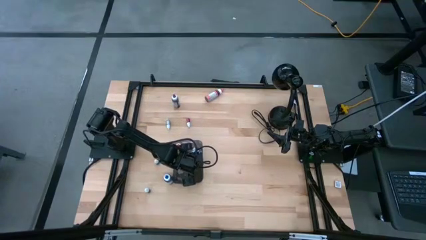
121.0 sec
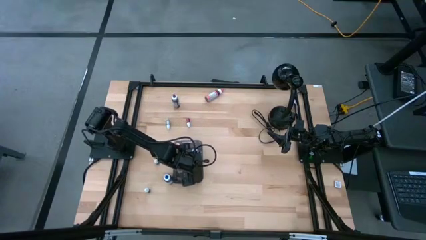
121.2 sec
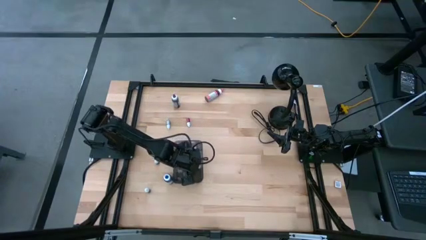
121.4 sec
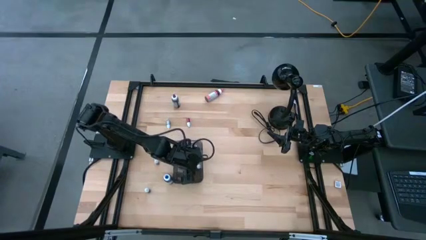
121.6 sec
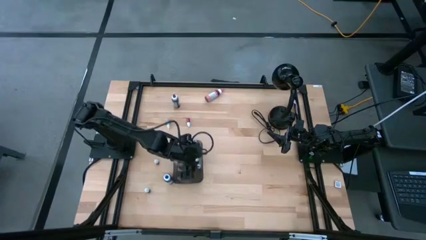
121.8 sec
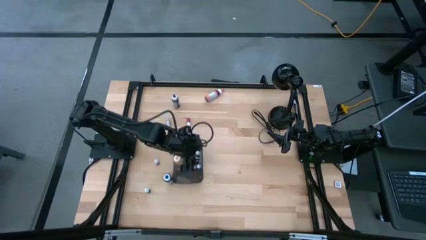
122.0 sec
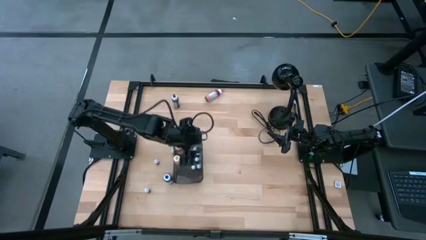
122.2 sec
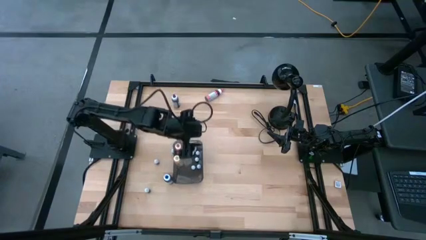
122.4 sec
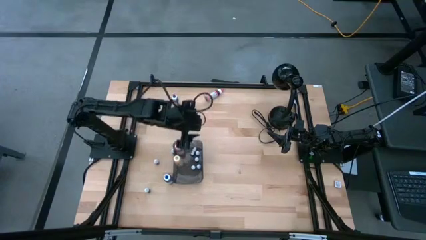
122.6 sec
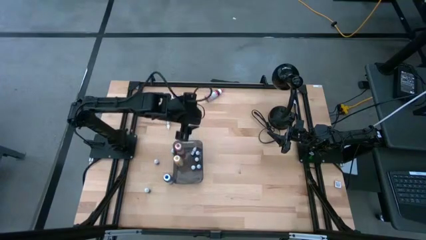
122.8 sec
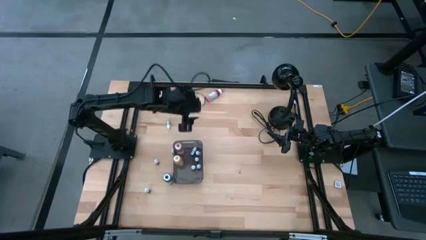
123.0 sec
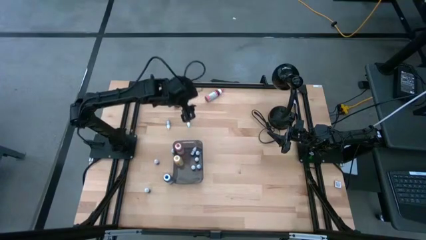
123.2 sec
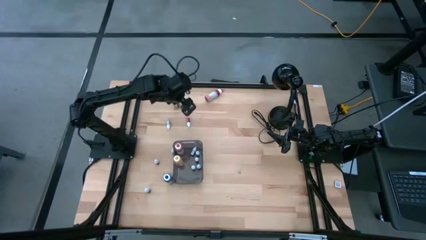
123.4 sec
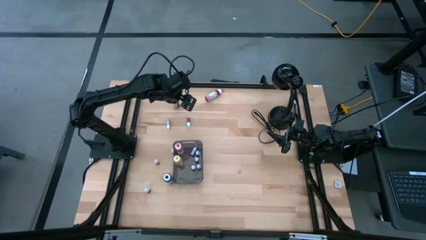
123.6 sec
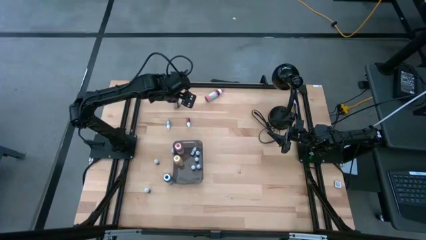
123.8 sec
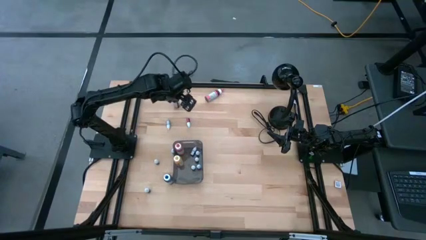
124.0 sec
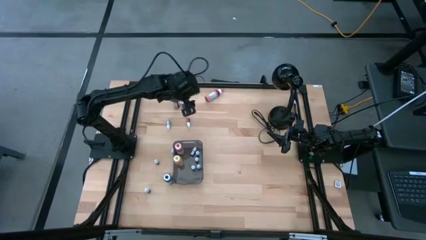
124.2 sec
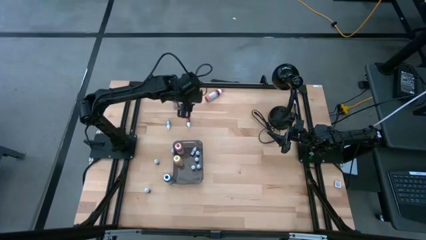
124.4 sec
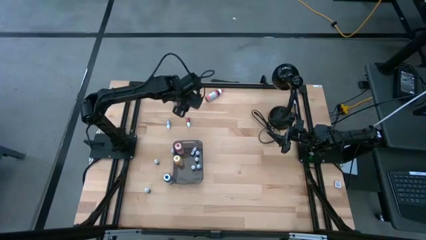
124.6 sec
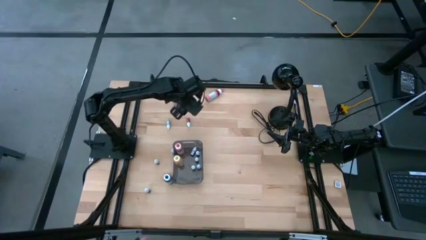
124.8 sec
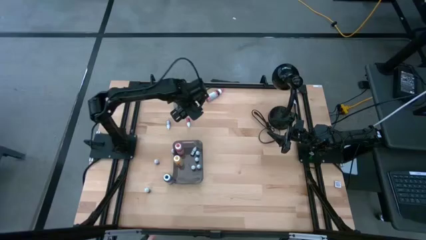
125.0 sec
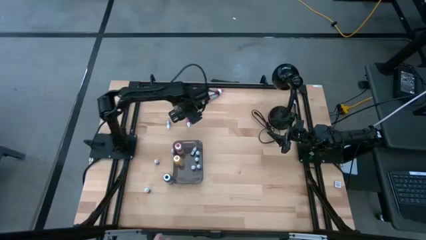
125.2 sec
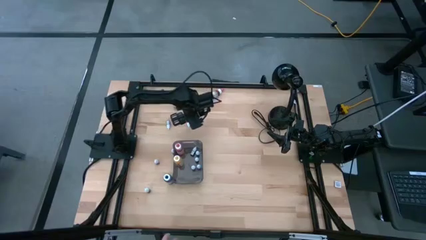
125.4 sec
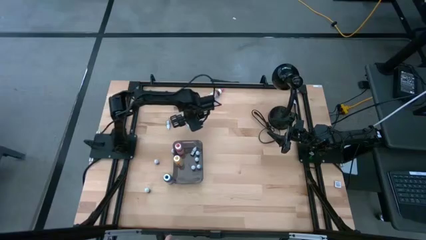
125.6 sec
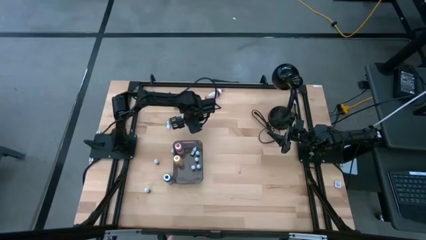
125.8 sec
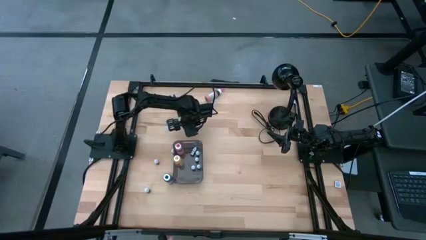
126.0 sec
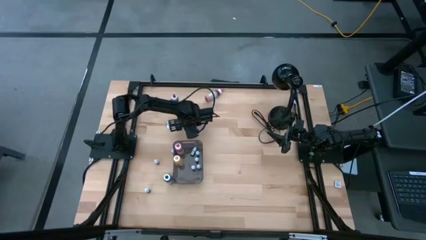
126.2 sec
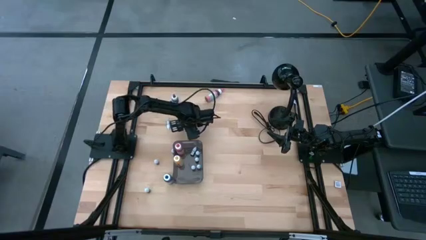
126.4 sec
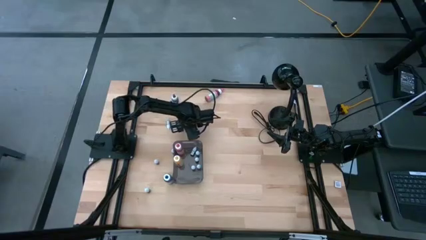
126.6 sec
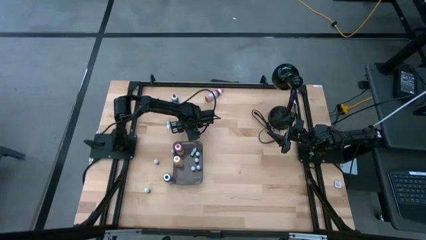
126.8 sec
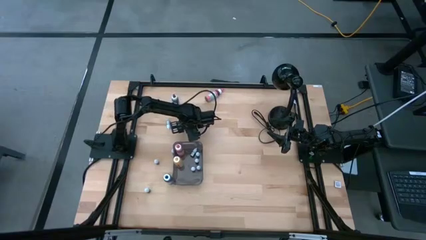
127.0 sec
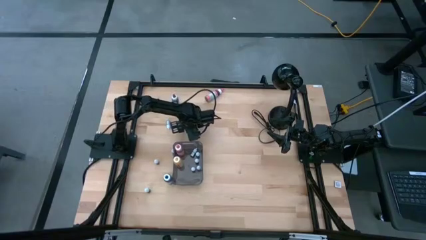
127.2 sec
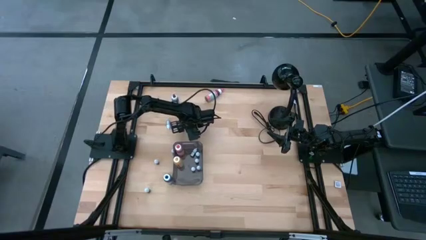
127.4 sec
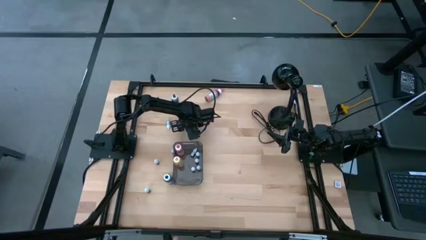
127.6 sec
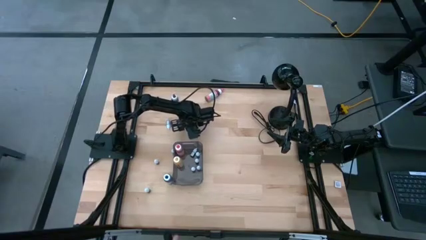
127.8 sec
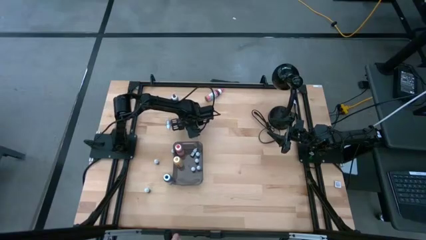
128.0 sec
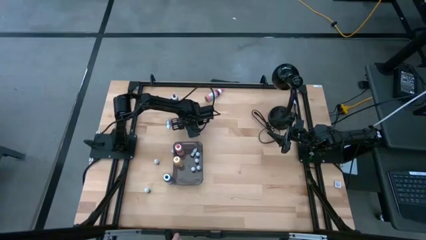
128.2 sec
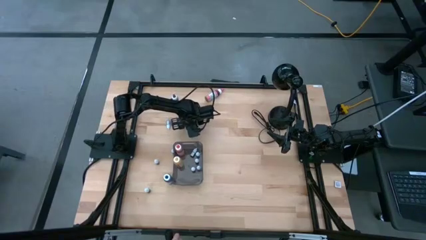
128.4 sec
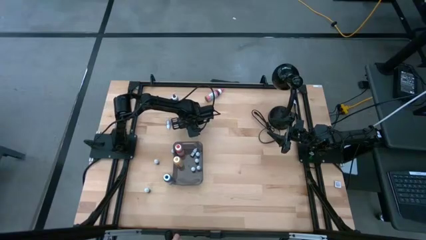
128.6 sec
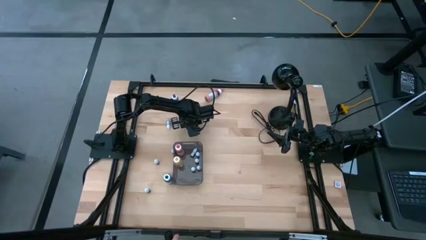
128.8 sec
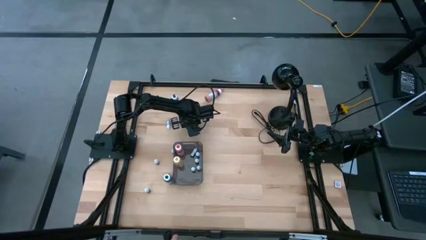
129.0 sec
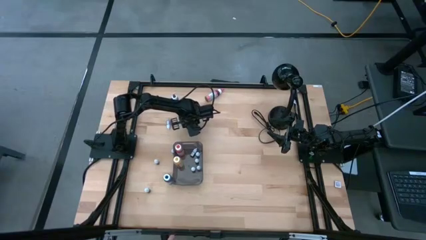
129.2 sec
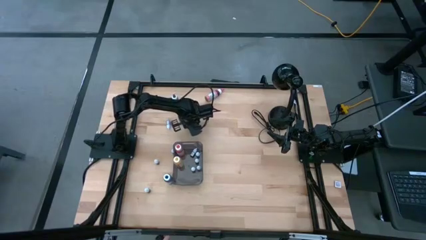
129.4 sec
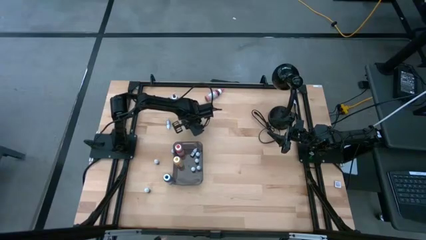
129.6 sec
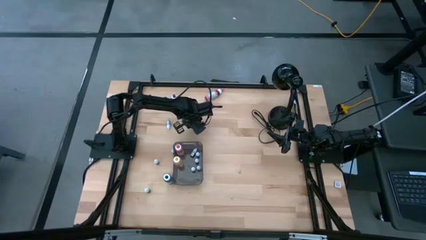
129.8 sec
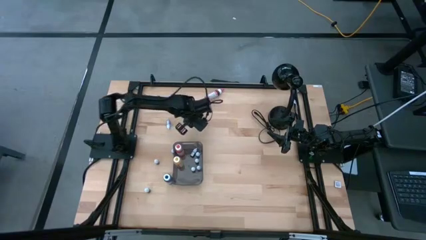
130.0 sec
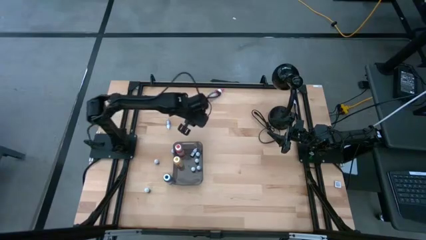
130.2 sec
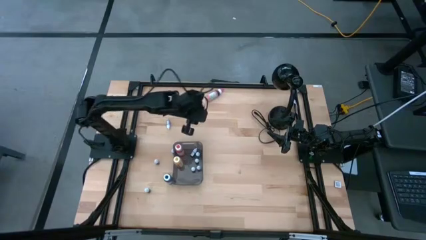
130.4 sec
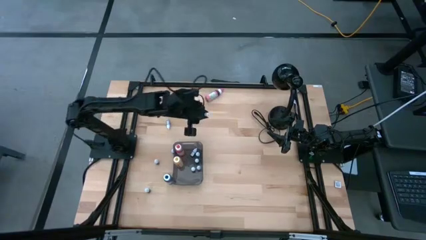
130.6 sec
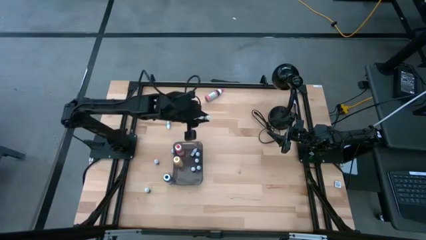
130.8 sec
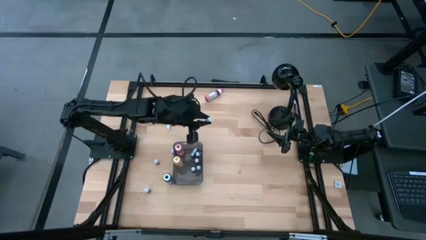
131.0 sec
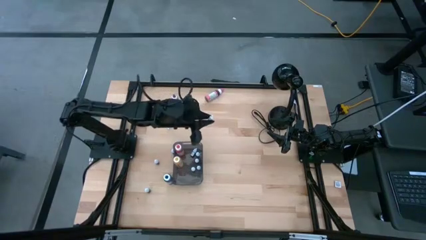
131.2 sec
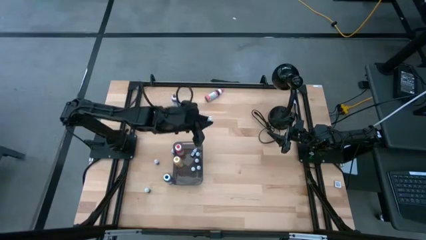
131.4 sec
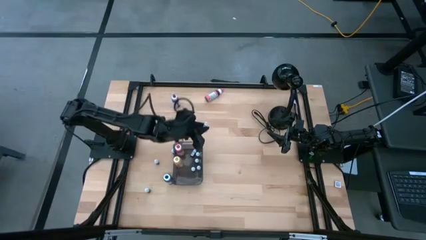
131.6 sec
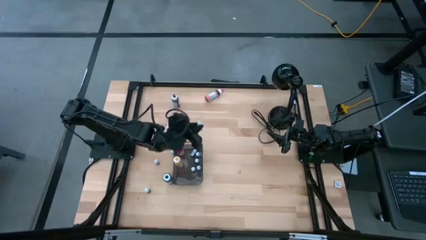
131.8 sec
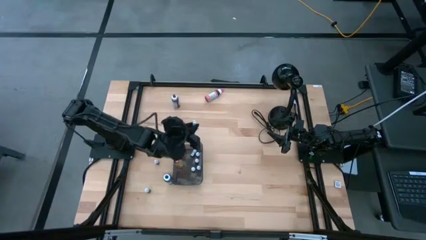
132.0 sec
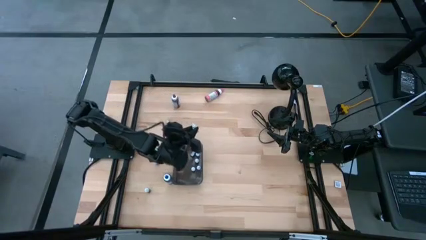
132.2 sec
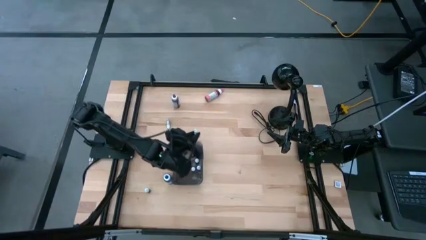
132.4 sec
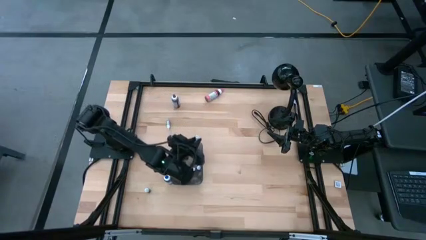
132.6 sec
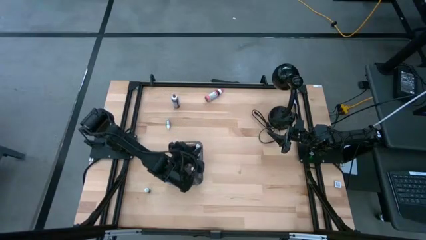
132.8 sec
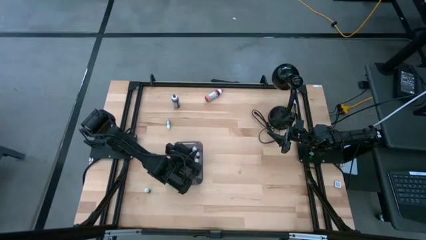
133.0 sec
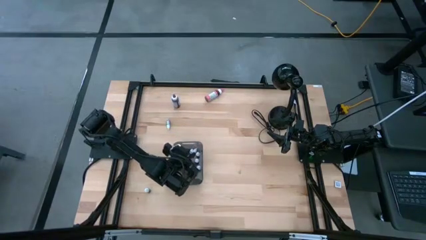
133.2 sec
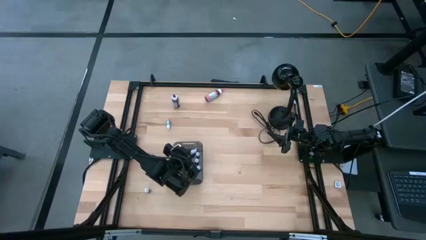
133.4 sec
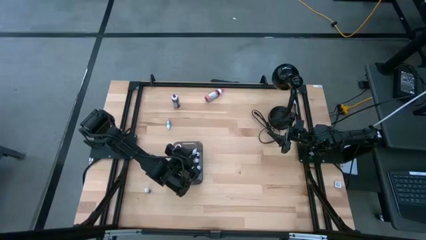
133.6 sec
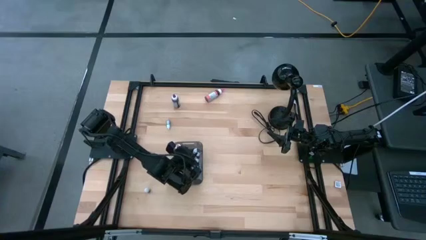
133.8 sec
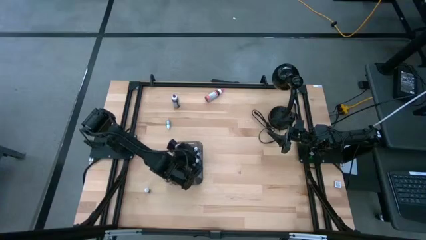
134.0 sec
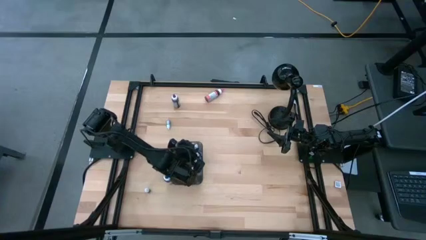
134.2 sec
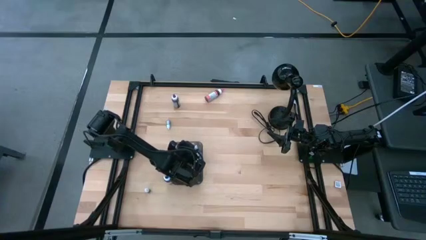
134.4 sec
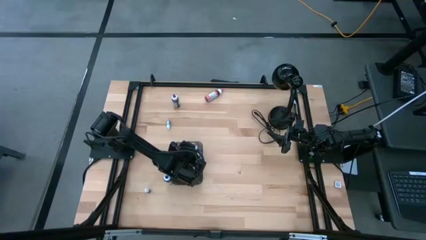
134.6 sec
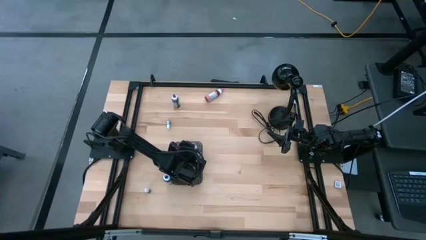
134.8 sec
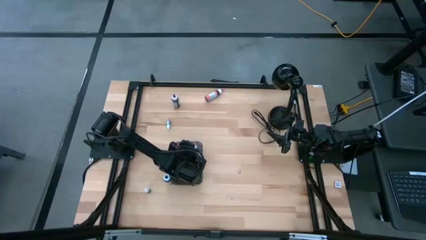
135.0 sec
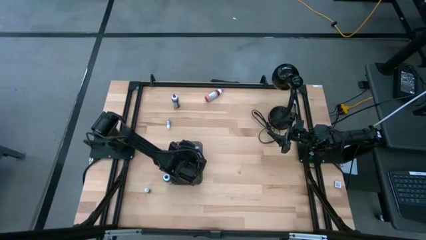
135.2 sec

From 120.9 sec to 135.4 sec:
Task: Pick & Place food coloring
Put the red food coloring bottle into the bin
